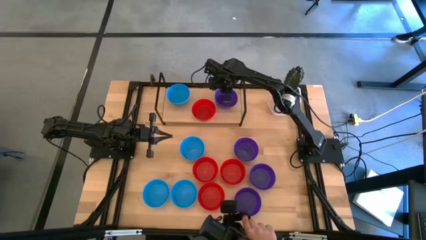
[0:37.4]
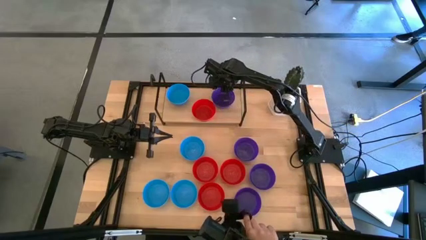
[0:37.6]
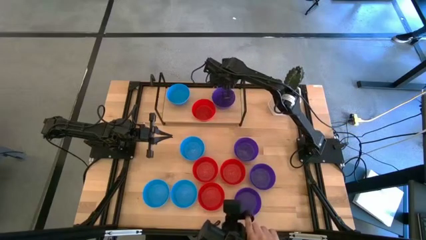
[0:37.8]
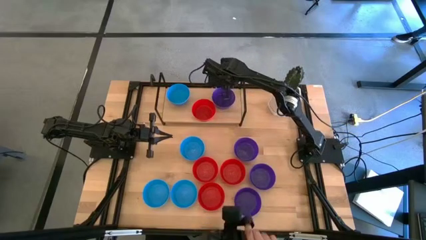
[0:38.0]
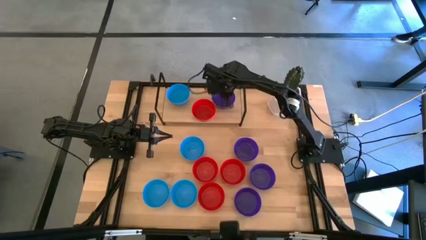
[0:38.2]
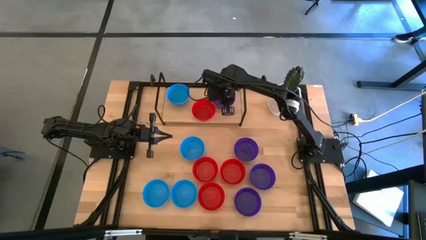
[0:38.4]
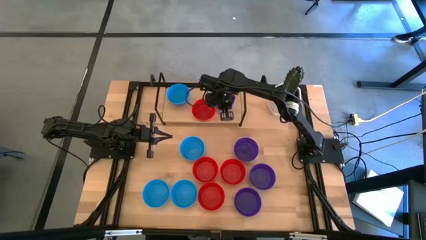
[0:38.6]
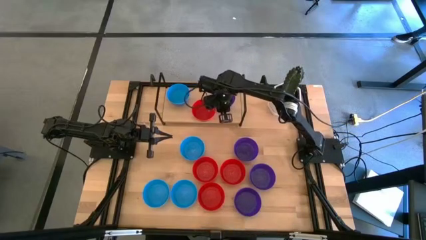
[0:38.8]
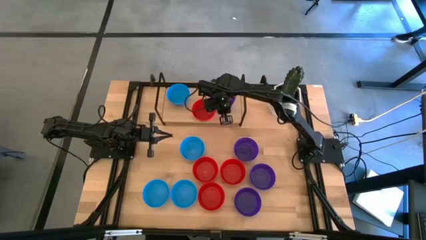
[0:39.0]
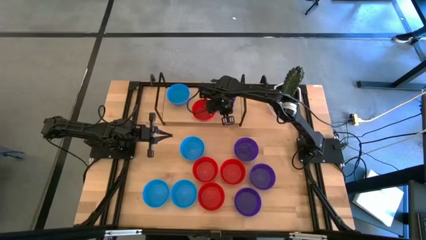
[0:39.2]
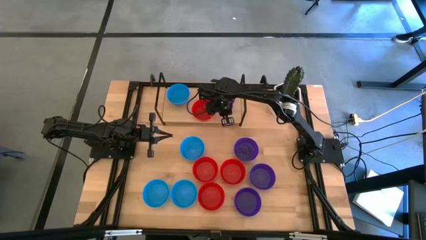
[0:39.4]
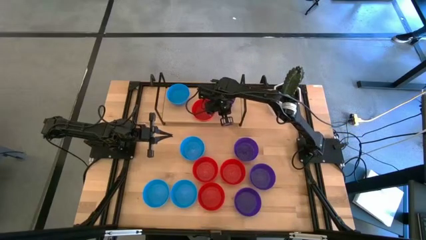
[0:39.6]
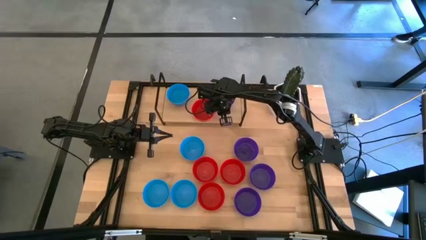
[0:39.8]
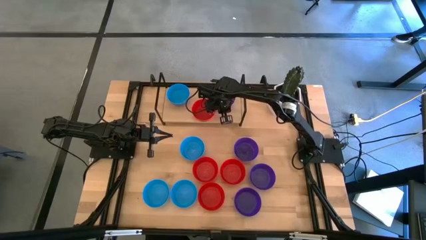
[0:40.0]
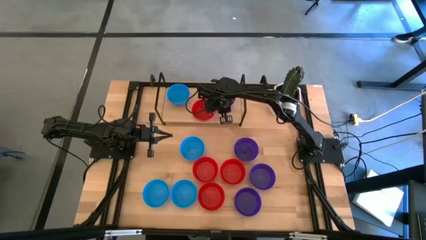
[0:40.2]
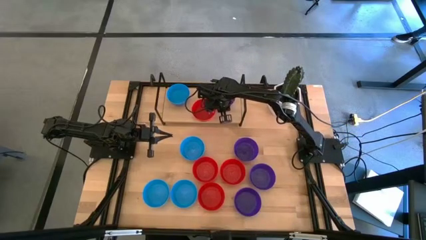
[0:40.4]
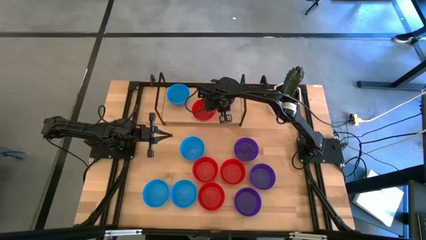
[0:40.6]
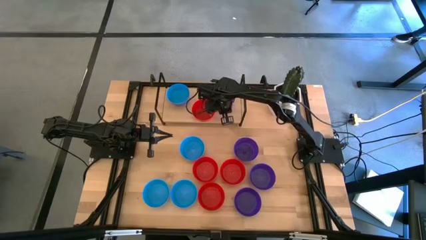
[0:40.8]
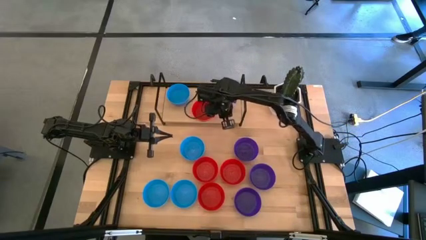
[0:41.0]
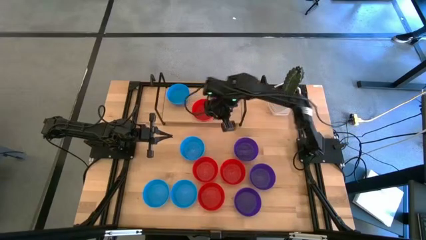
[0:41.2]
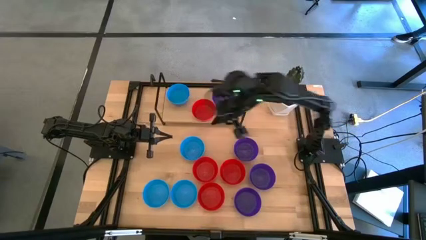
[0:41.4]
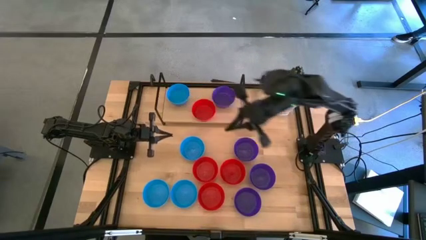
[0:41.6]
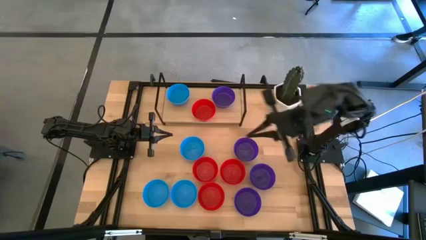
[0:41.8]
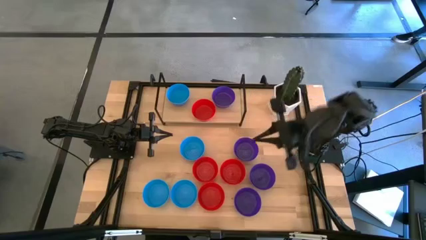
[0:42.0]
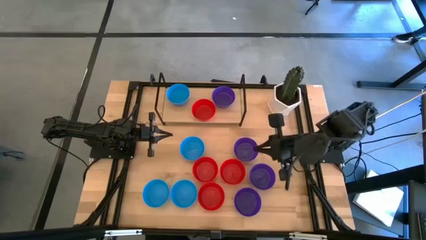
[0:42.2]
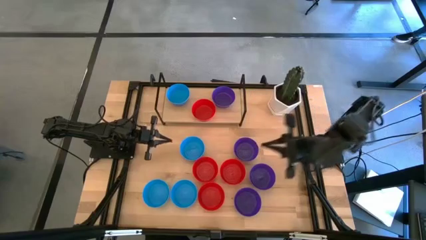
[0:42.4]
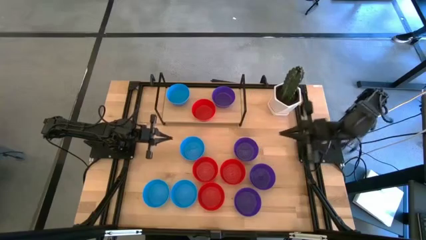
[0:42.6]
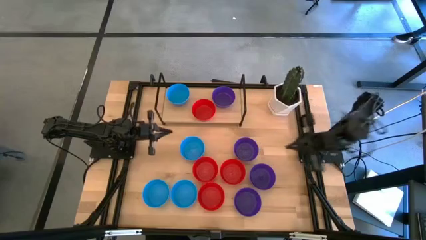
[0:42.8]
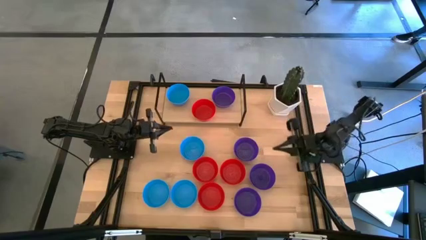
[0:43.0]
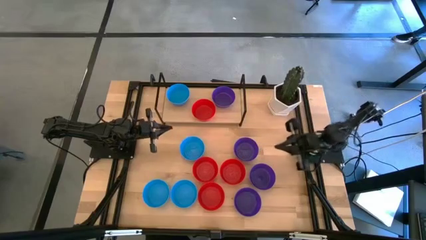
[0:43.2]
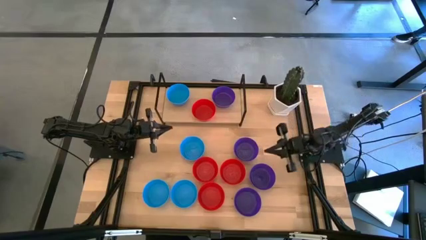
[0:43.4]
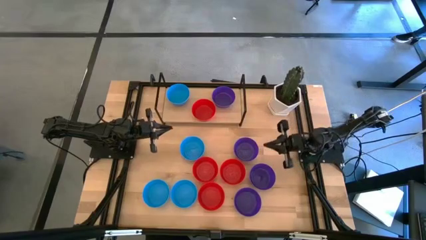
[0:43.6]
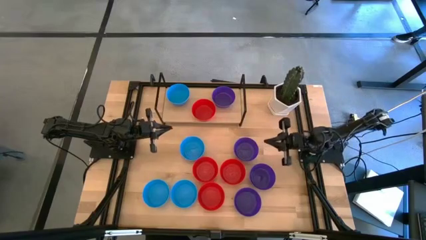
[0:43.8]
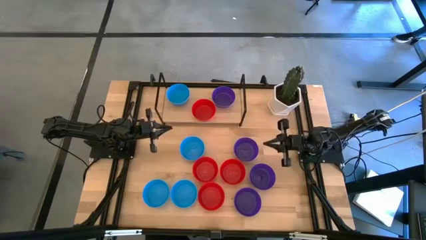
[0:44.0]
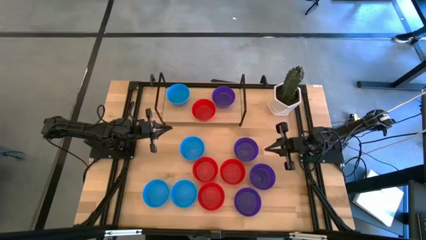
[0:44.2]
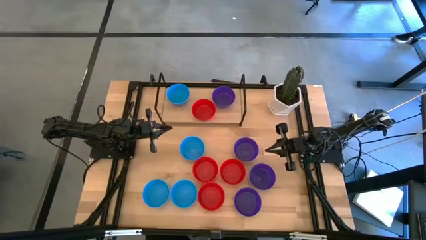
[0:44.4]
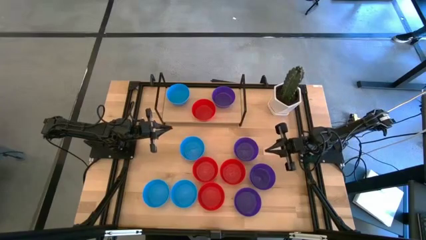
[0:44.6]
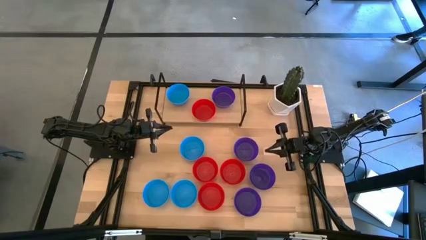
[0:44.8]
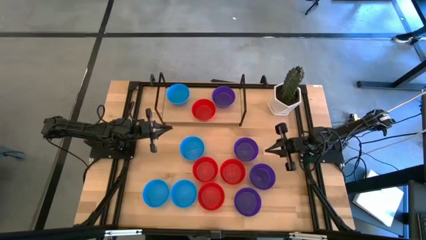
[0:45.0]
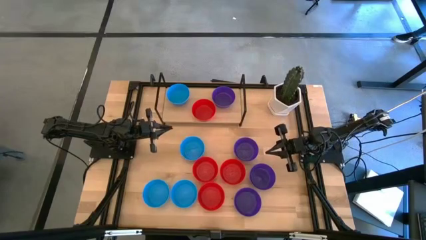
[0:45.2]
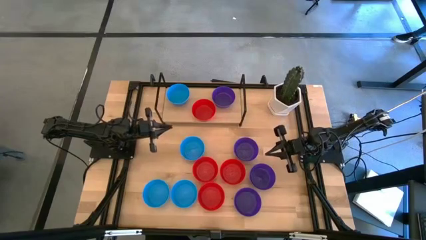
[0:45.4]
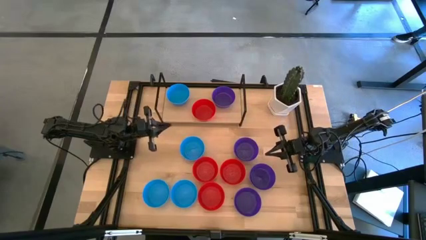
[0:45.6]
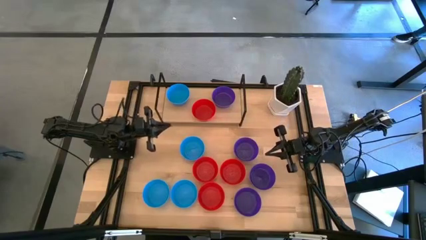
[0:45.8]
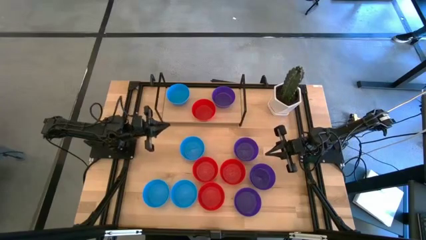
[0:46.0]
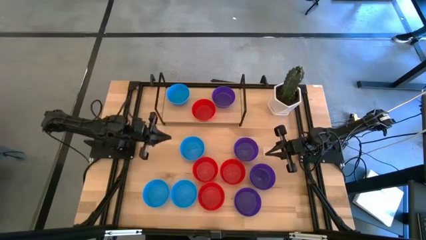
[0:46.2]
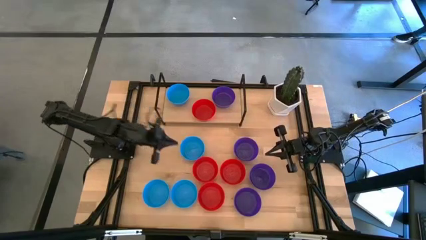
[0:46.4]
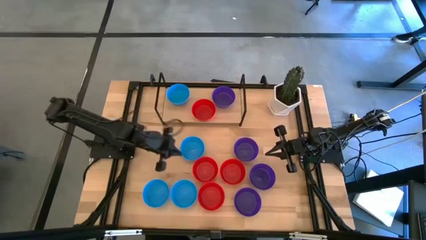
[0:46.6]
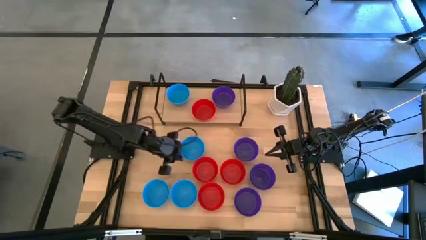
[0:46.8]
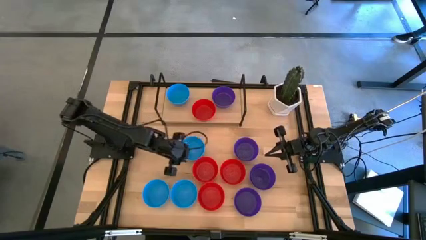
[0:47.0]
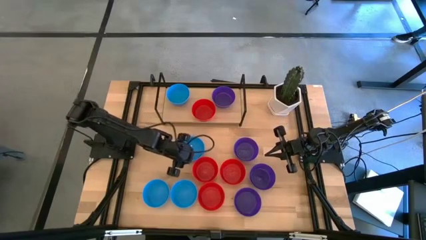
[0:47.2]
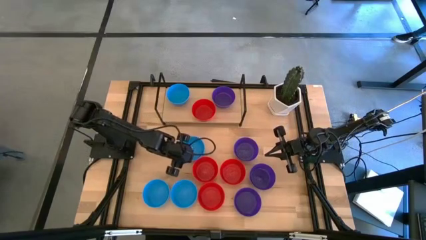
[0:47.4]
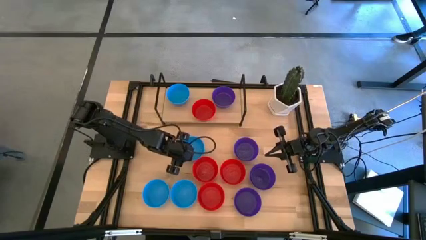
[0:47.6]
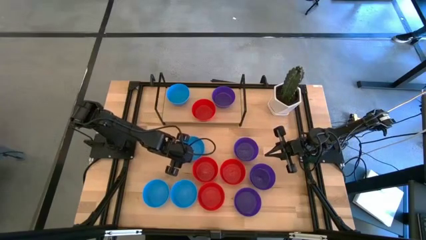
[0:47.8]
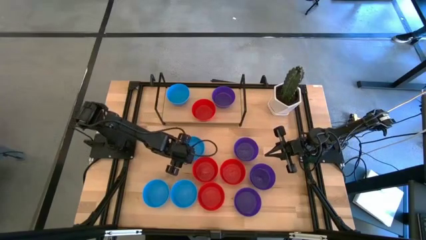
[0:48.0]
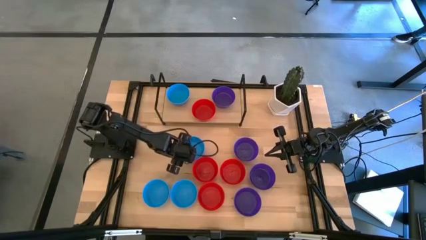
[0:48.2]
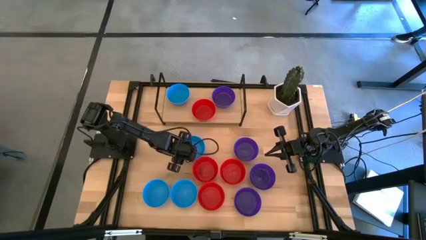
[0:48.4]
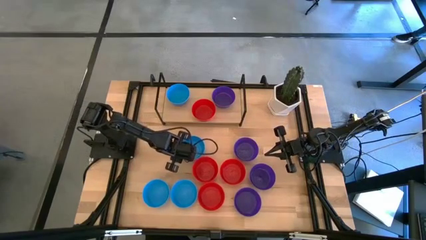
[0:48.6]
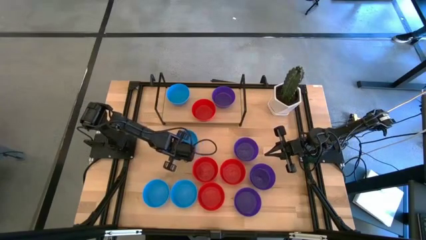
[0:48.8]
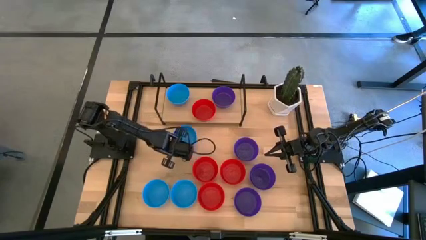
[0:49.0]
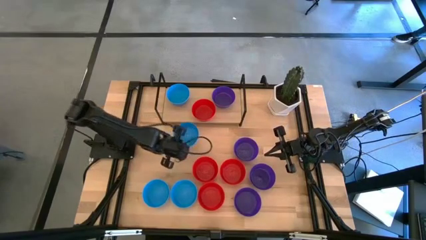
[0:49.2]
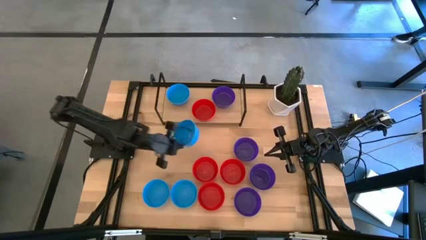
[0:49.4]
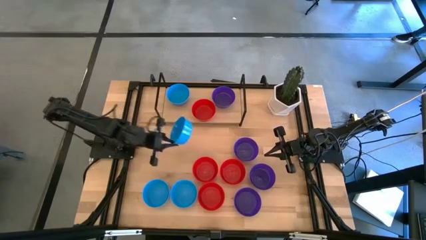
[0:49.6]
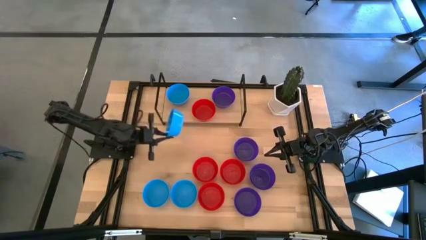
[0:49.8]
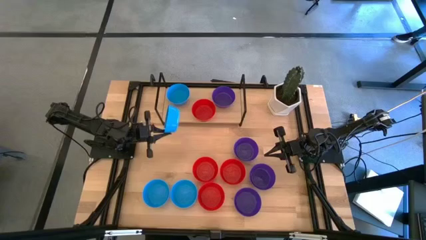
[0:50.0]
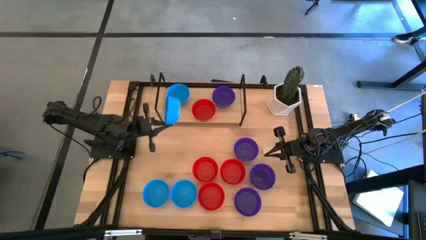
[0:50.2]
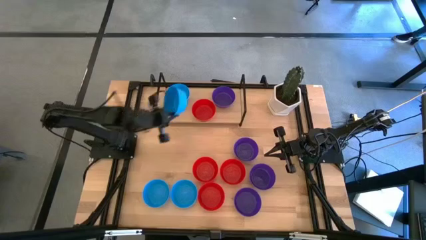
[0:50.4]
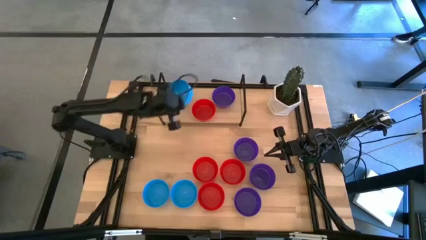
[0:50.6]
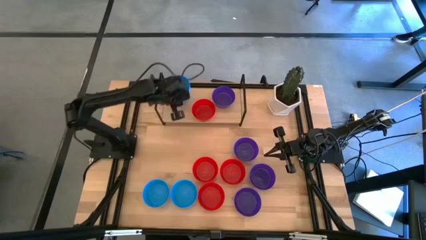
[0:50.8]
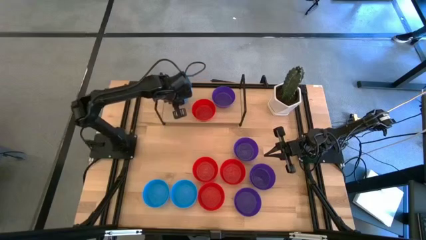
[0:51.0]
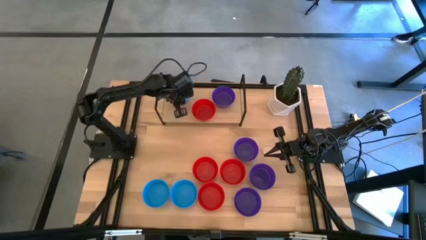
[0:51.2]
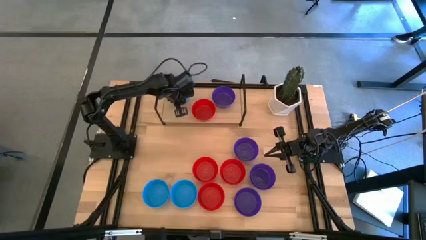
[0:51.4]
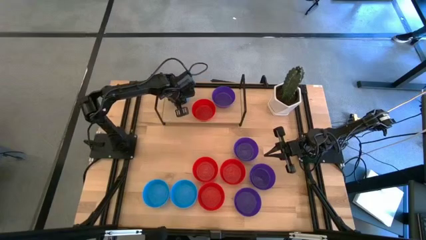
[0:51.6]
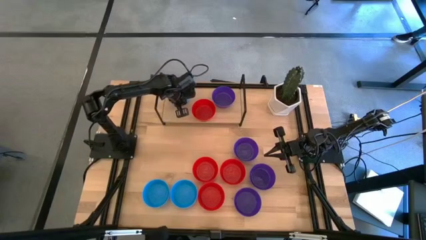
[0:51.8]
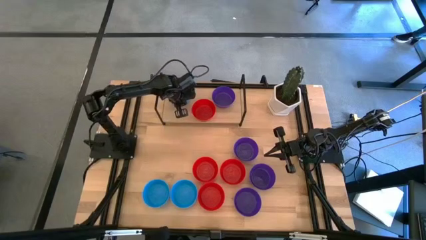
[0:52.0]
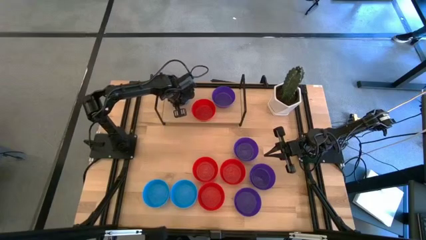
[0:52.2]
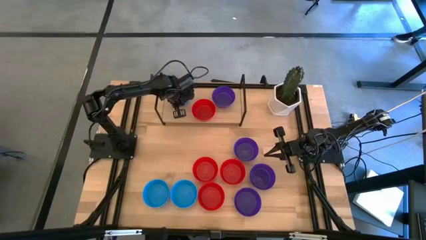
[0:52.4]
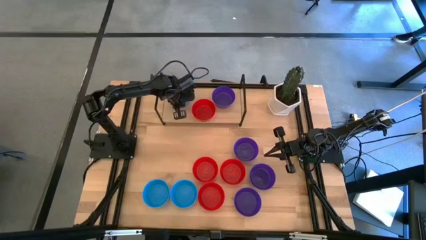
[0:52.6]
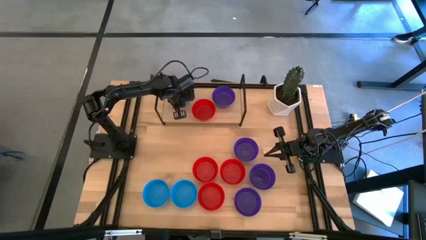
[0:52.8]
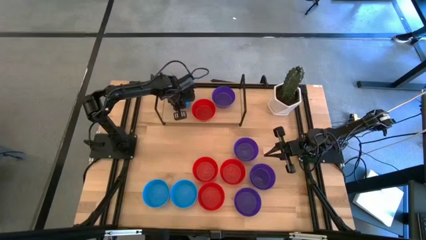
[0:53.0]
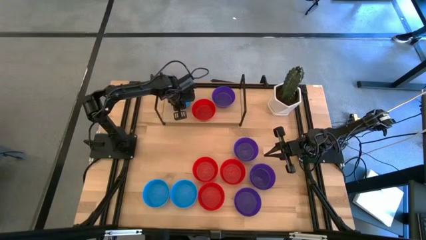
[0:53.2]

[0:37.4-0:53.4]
Task: Pick & Place Mini bowls
Stack the blue bowl on top of the blue bowl on the shelf
